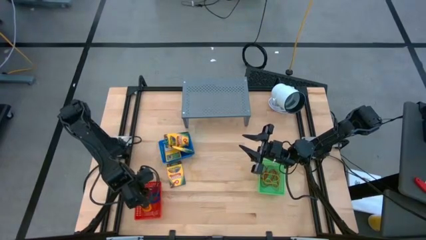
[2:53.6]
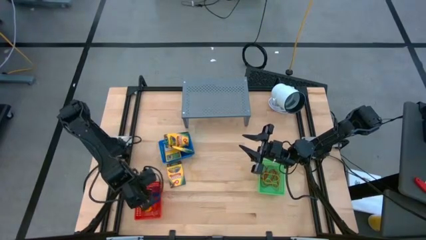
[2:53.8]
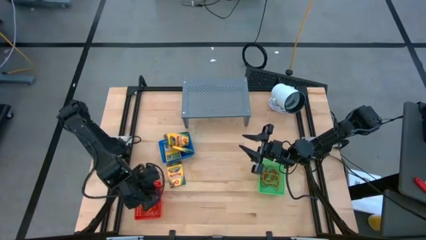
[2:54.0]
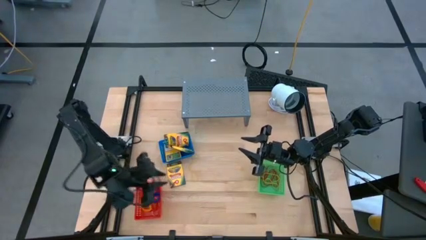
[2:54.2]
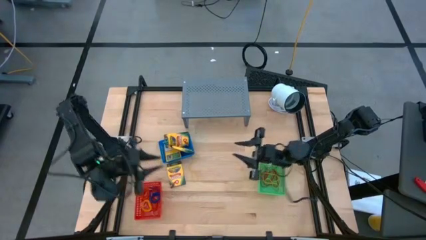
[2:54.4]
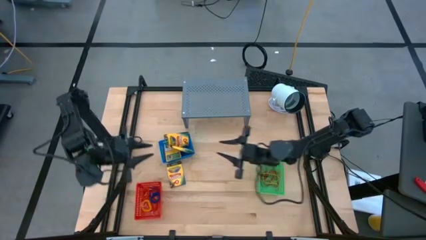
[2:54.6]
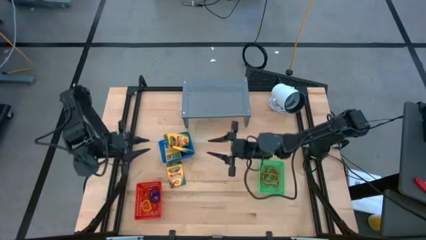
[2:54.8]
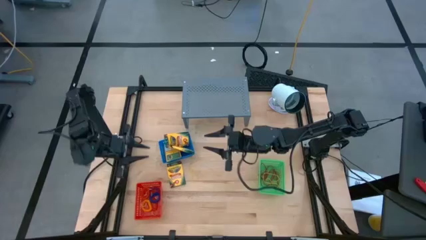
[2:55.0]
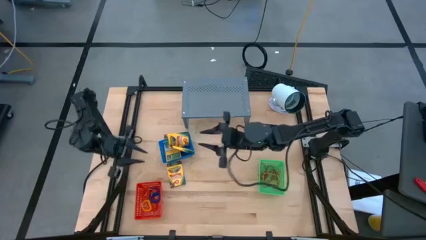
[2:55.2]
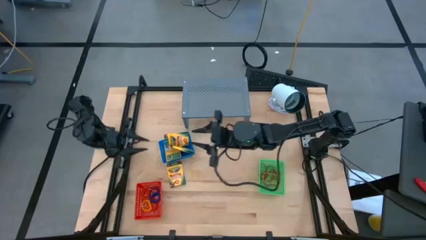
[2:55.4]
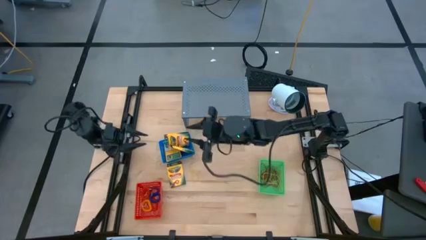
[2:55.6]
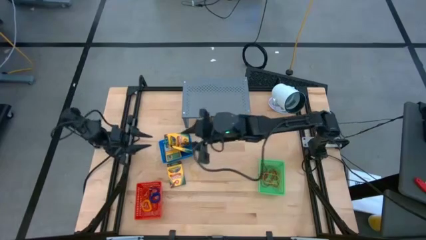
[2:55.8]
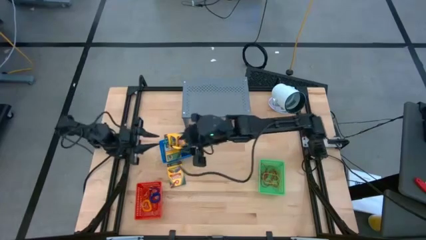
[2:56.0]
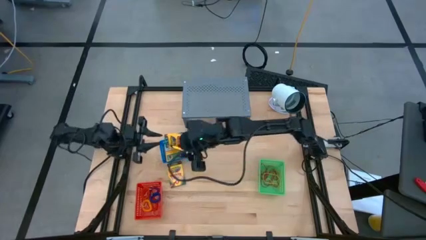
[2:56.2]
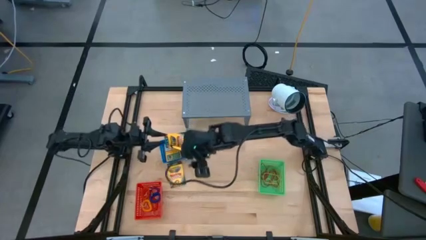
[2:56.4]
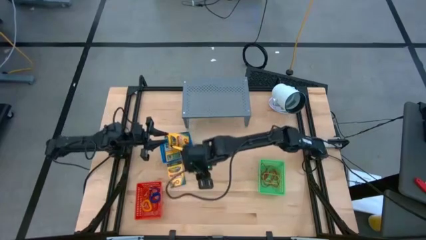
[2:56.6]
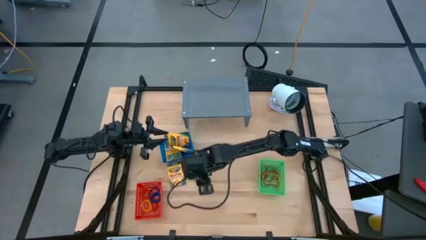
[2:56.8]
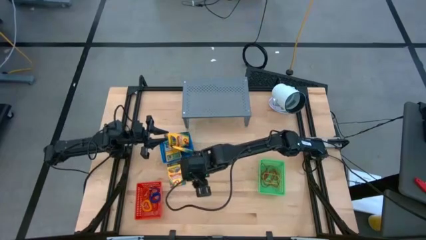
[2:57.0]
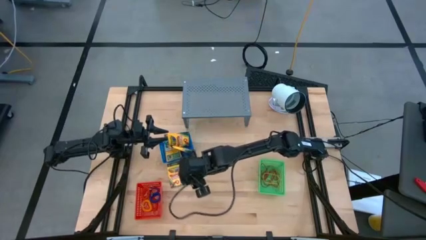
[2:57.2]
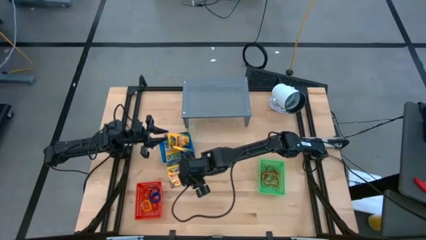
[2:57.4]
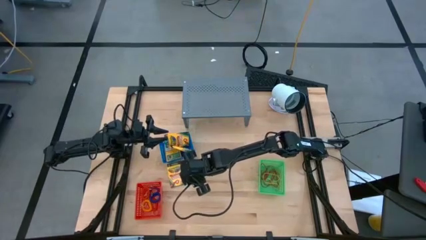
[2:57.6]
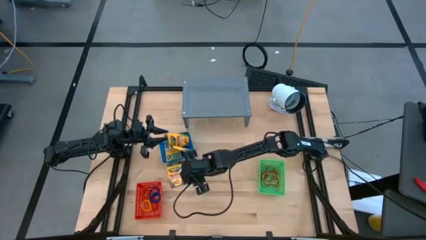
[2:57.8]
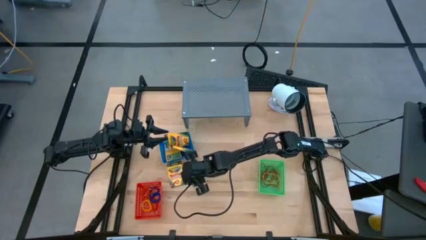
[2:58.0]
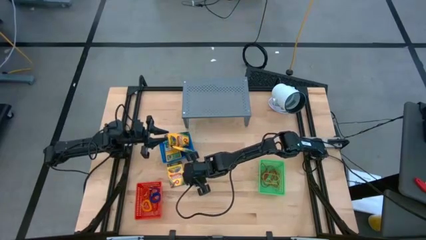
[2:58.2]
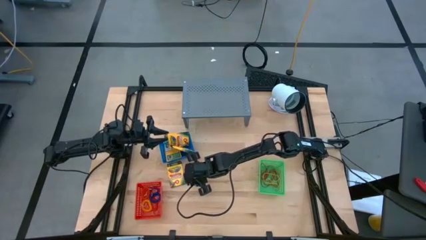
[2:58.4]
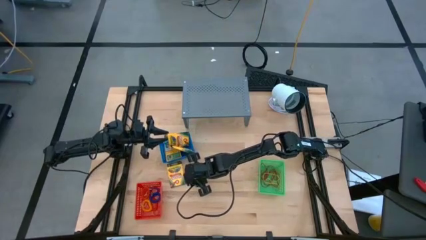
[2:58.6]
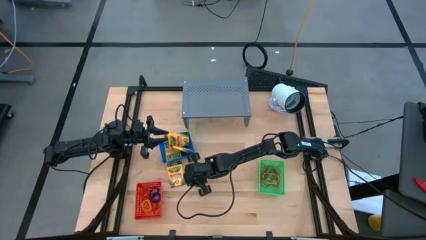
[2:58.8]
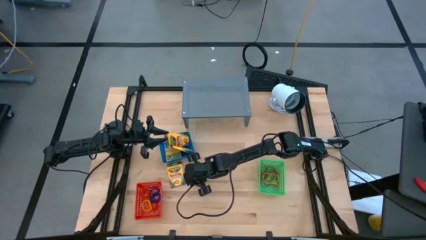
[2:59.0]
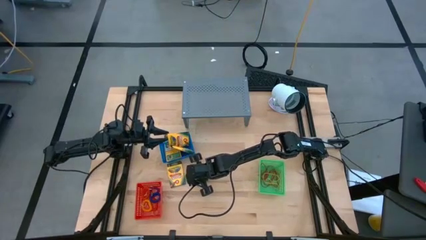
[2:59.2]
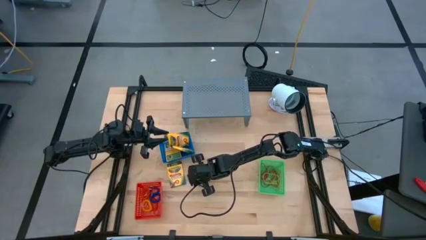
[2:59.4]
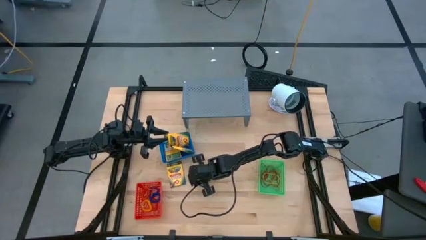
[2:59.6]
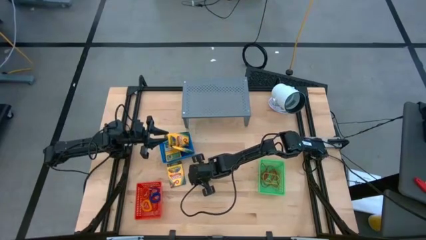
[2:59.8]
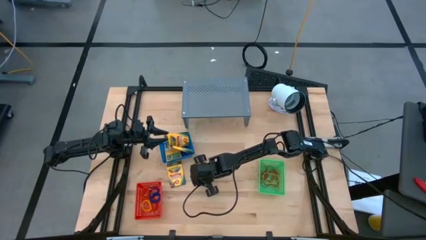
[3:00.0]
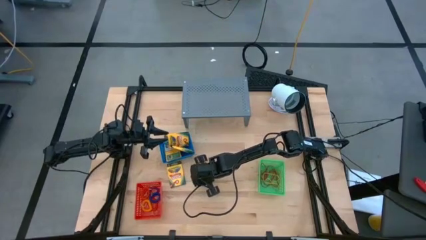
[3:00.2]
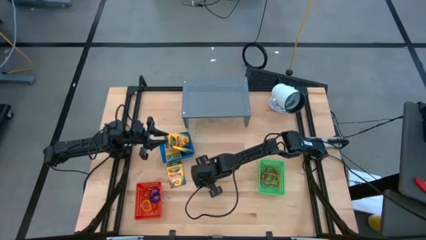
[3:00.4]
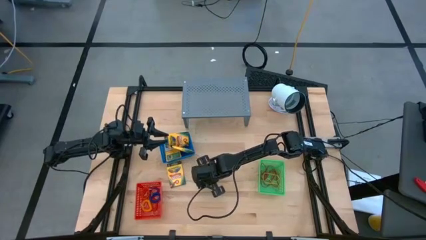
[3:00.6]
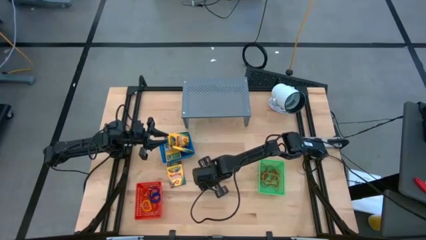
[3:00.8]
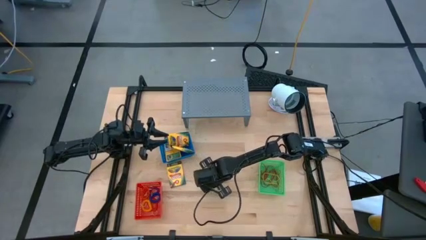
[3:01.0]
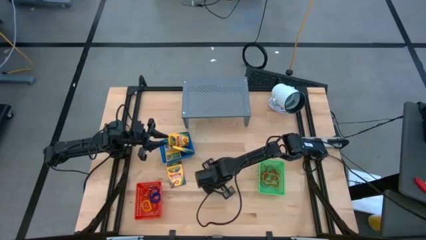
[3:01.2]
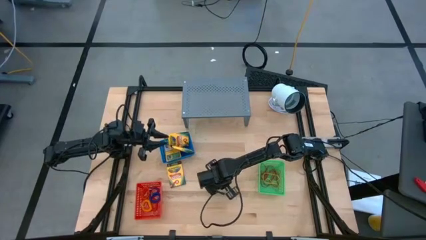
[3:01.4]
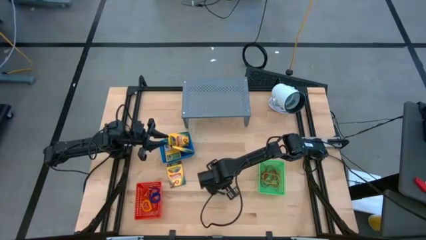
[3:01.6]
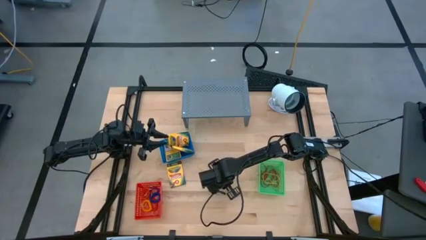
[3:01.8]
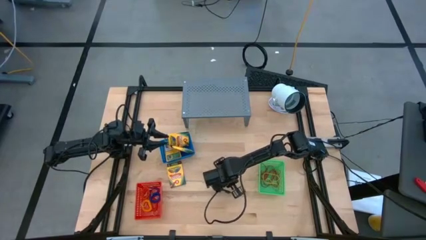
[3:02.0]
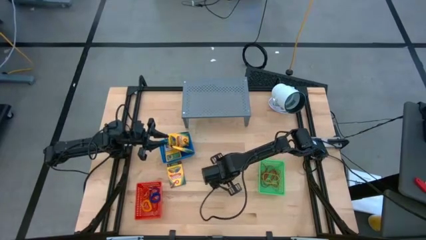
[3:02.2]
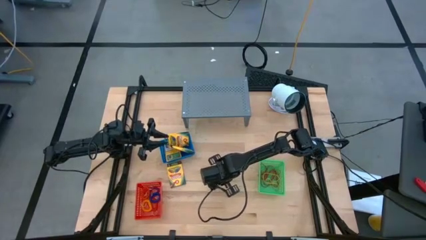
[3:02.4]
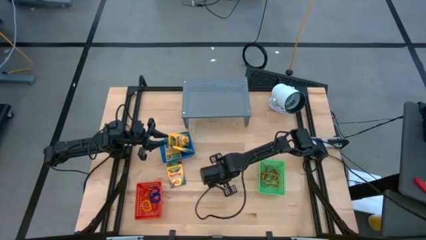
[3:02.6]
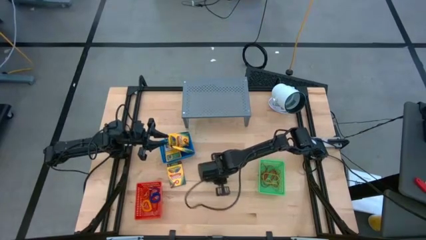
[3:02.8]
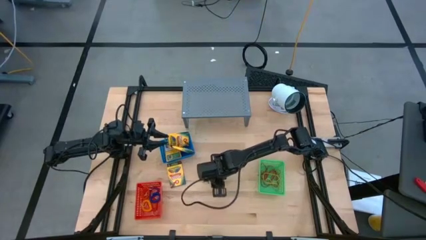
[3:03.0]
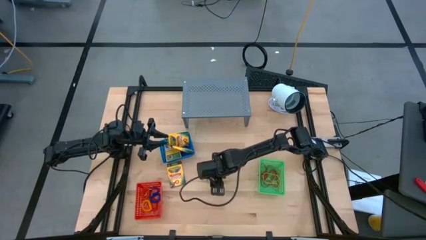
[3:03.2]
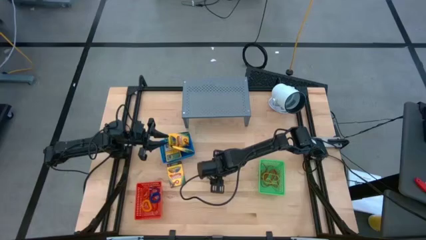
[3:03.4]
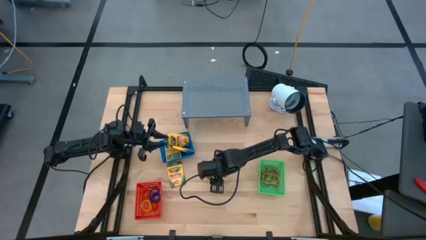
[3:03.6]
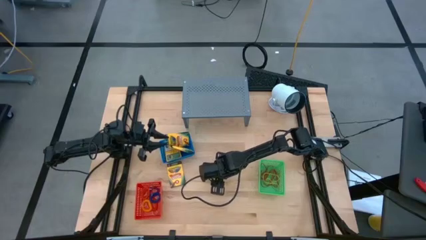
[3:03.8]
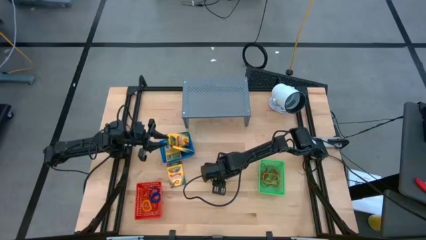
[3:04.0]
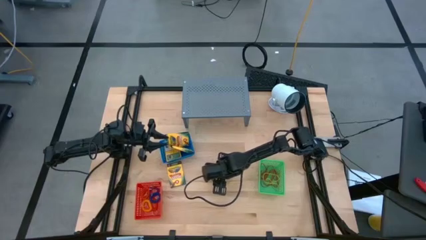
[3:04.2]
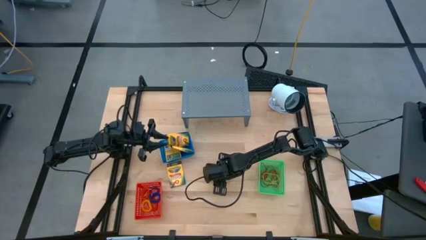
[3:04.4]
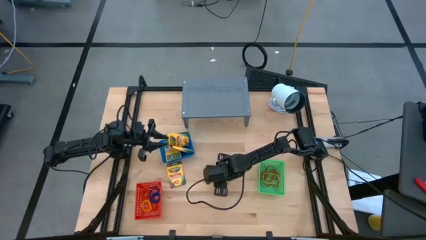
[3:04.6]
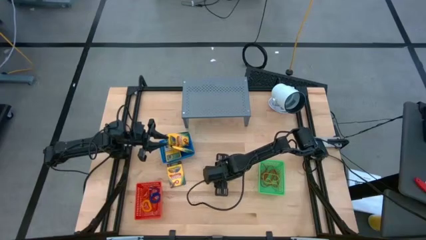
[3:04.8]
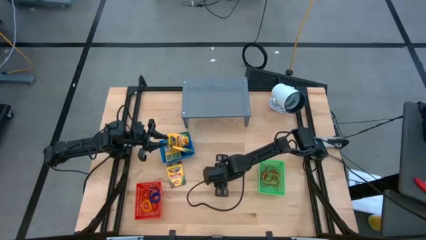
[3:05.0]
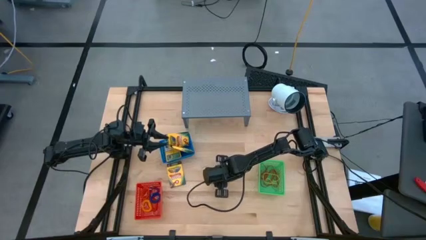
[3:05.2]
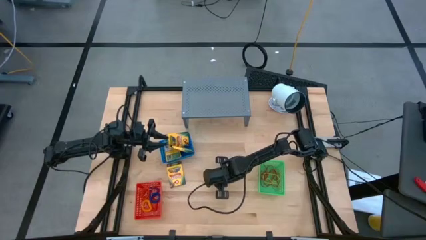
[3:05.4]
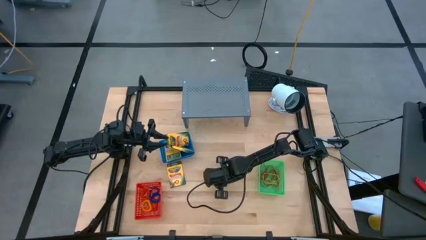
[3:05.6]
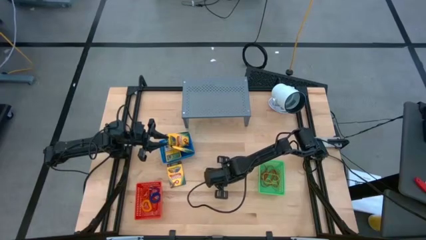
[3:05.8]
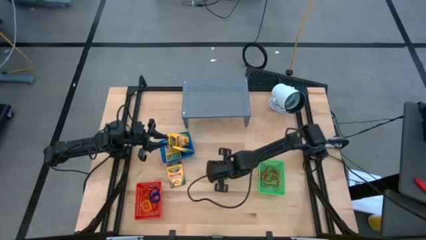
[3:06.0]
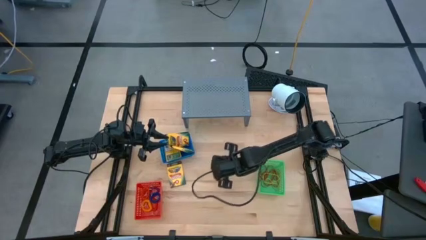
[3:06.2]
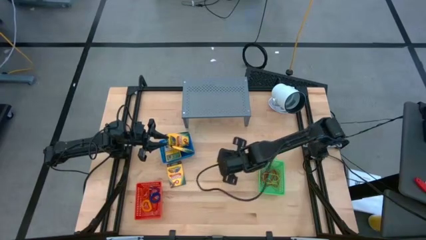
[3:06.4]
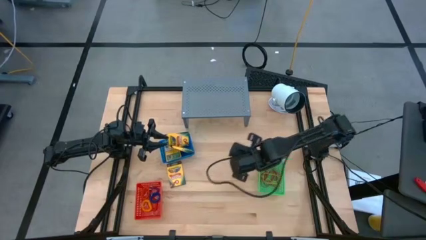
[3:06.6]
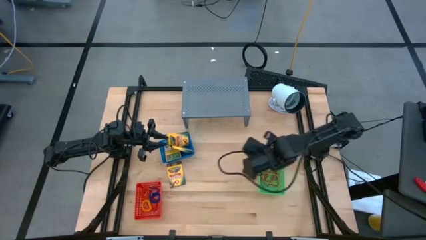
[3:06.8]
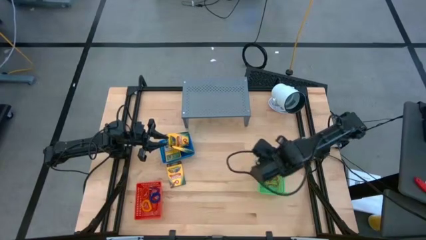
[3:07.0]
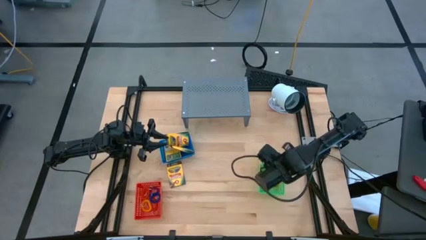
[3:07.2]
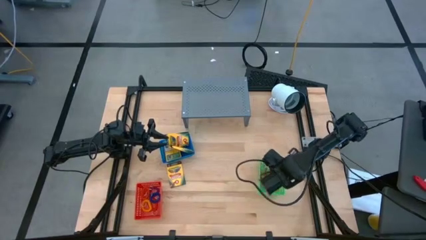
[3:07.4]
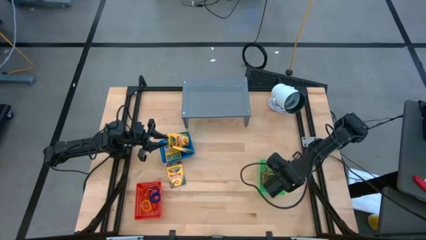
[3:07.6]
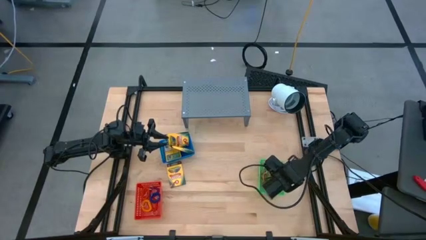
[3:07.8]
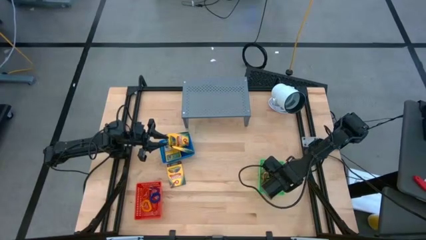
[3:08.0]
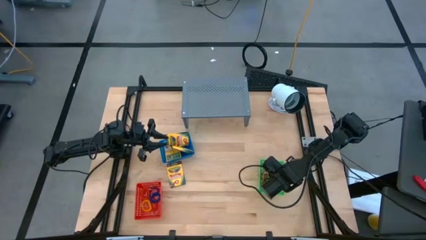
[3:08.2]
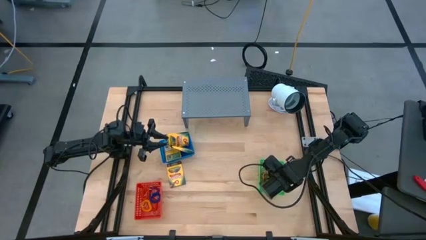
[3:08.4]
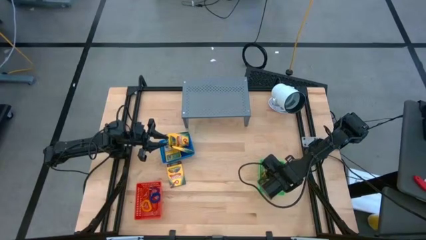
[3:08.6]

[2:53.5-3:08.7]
Task: Pick & Place Office Desk Supplies
Put the yellow rubber band into the green bin
